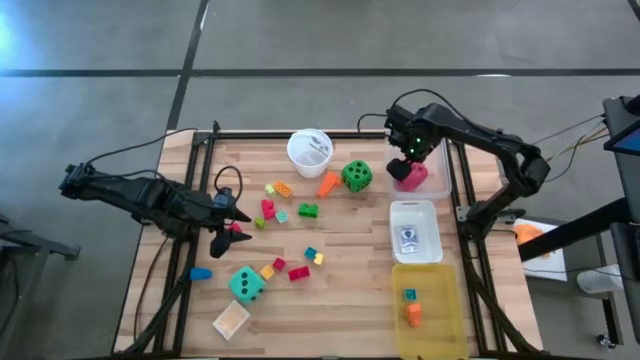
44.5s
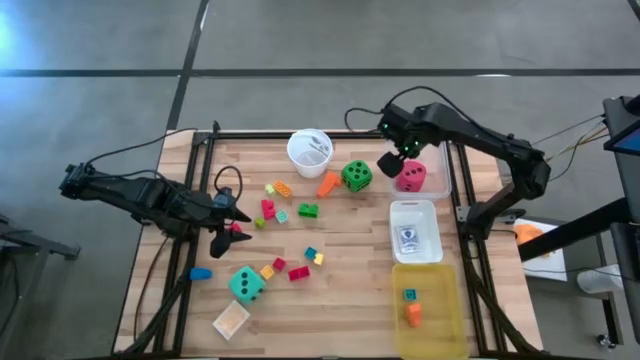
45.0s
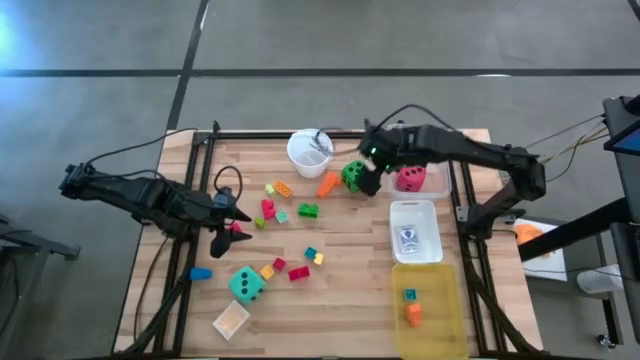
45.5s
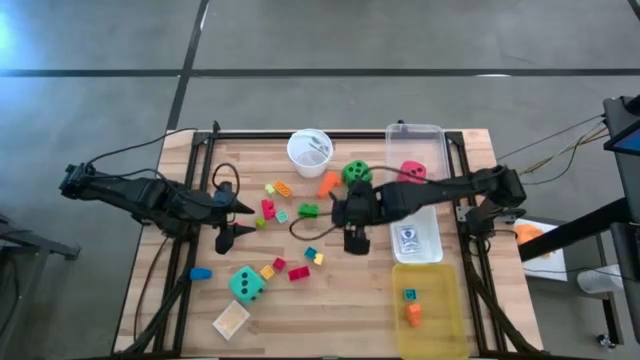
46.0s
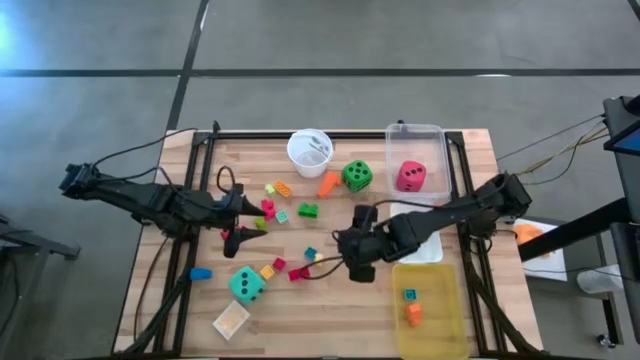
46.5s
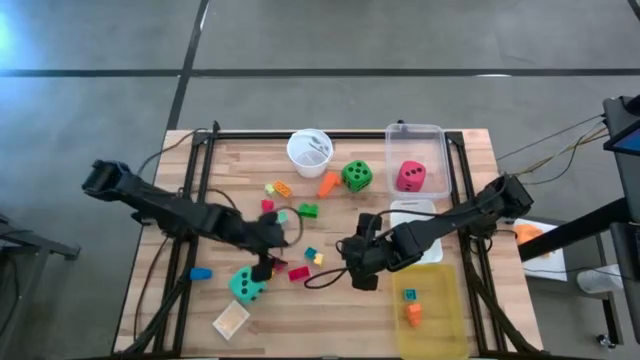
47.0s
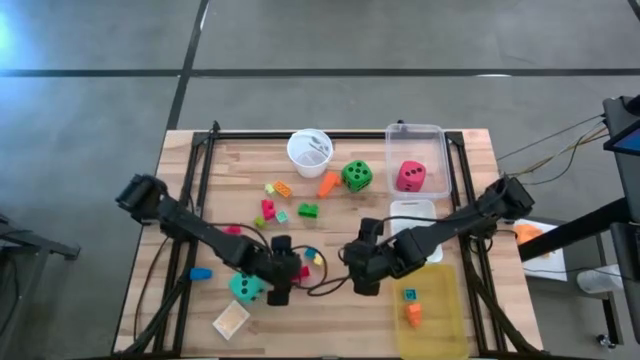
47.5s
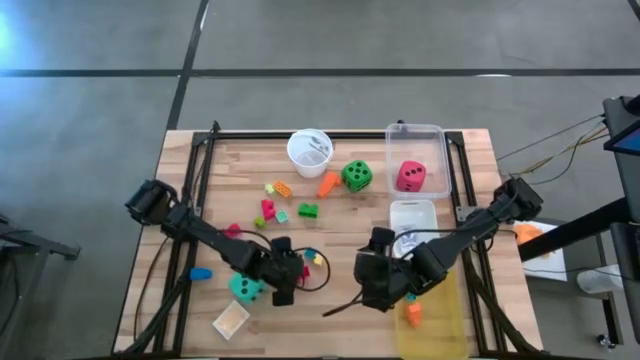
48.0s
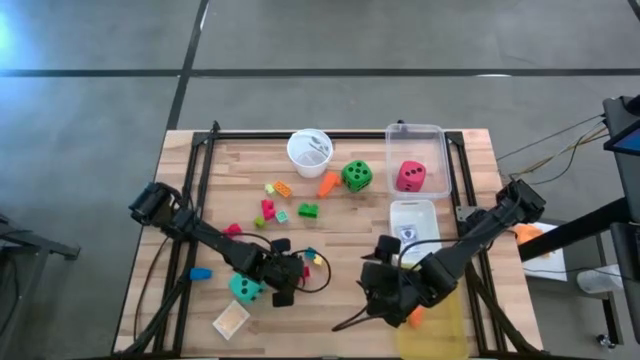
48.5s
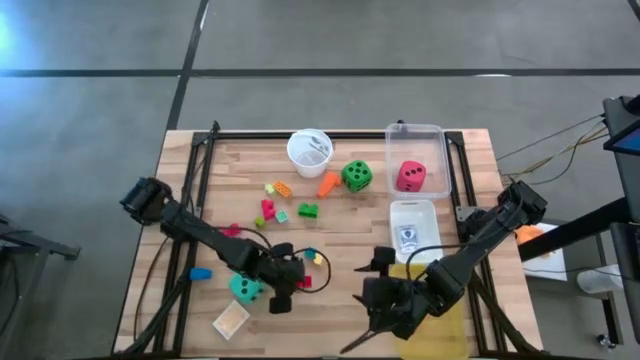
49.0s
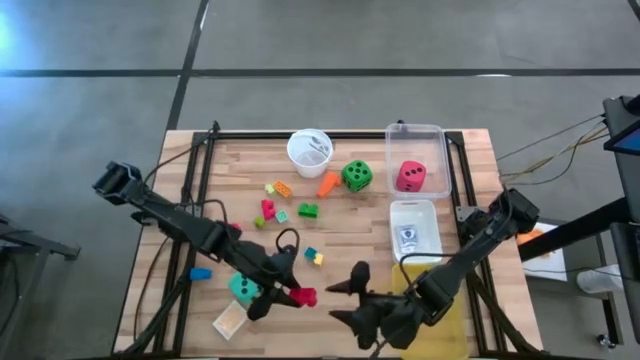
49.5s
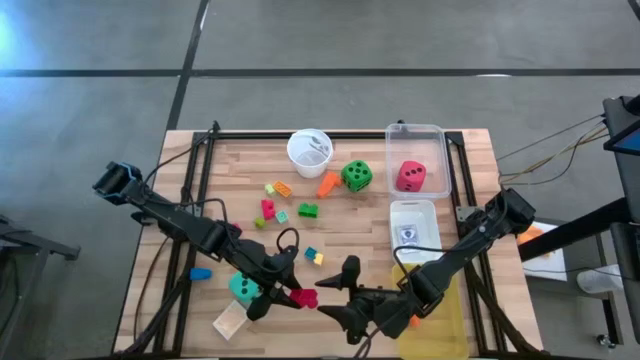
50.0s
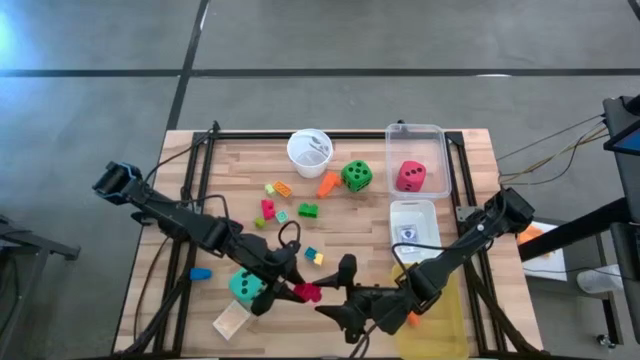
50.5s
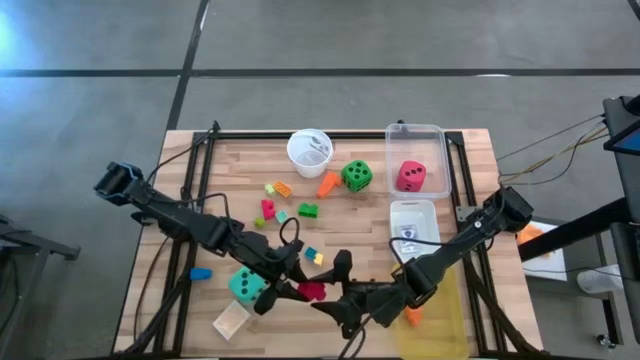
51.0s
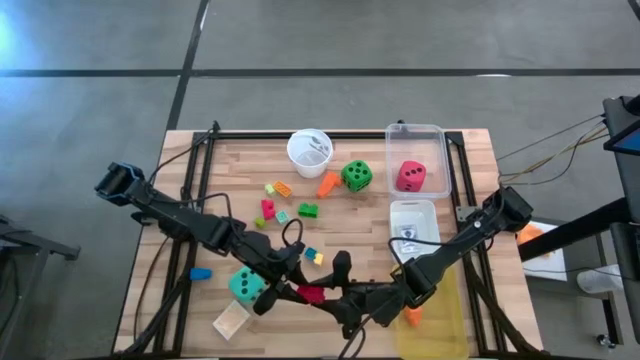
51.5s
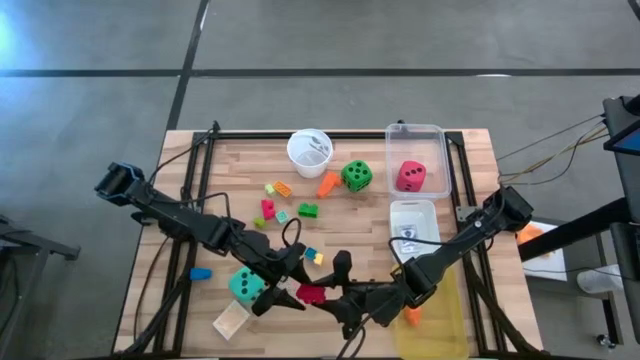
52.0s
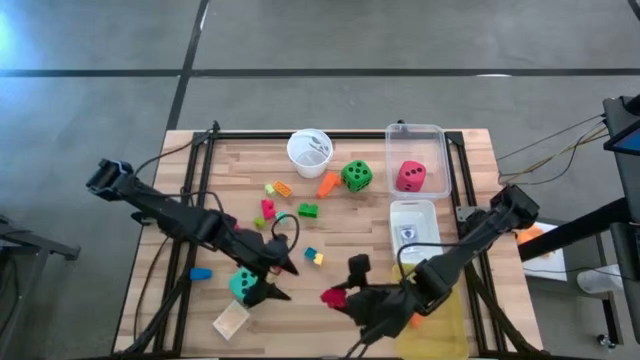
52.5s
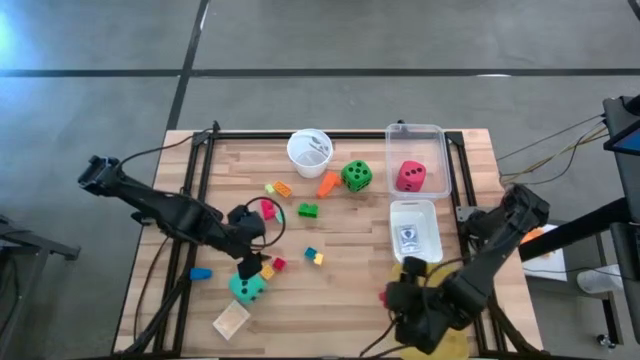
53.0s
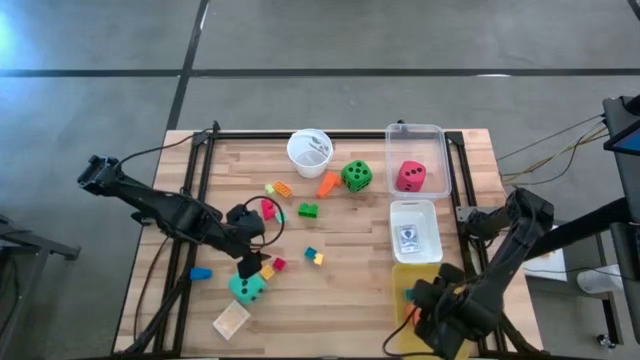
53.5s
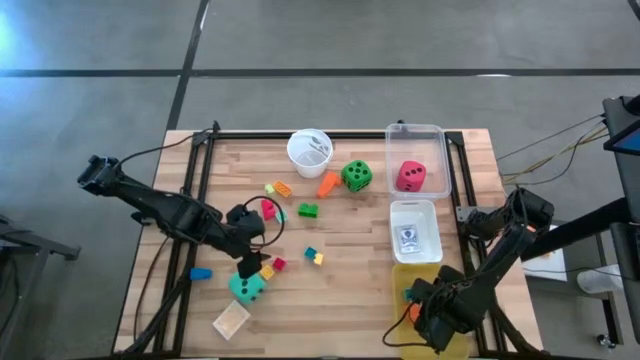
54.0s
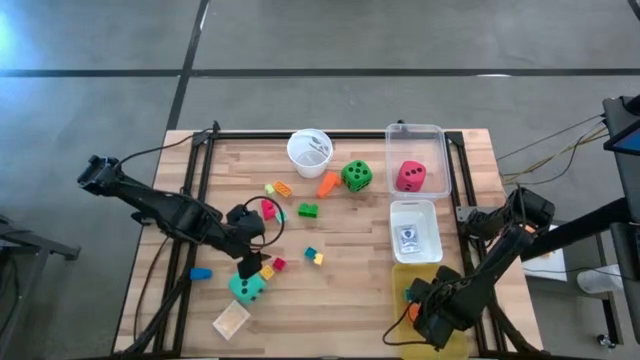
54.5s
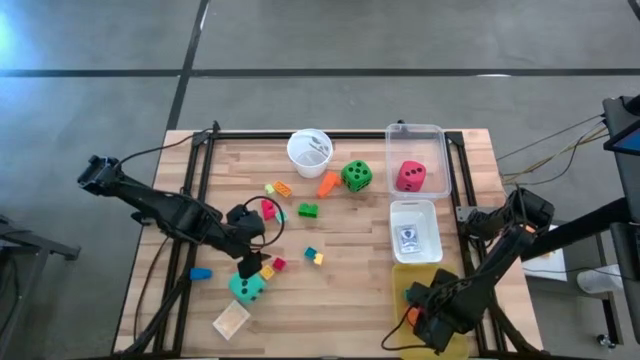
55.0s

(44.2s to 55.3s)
Task: Pick & Place Toys
Put the red game piece into the yellow bin

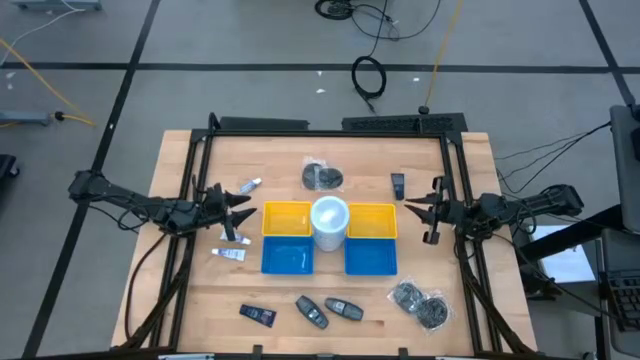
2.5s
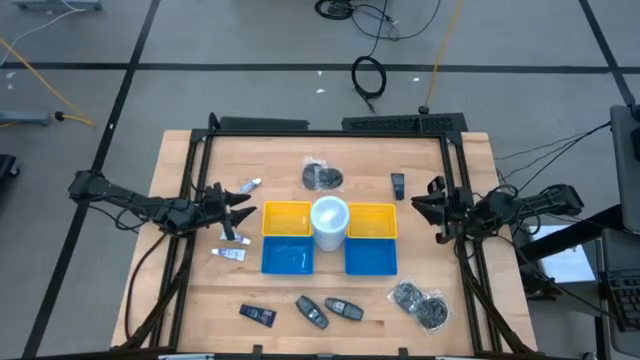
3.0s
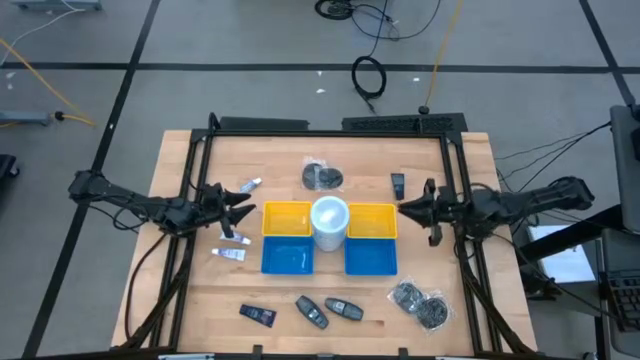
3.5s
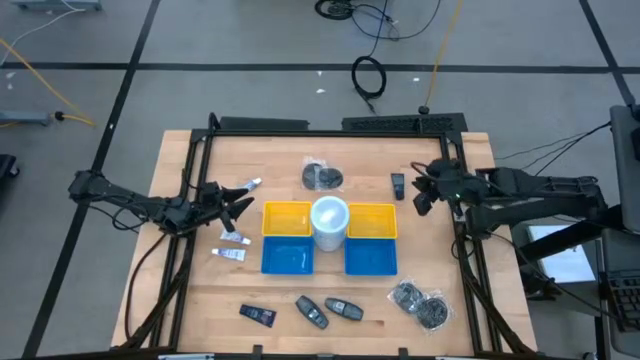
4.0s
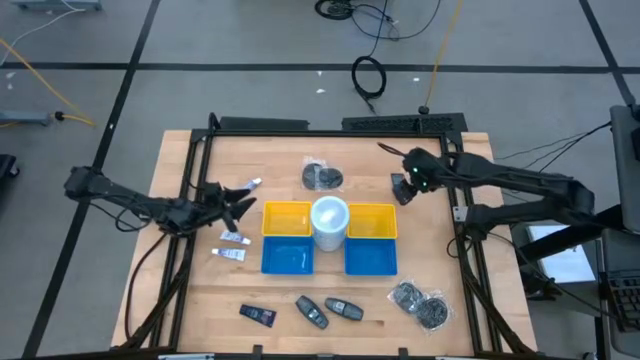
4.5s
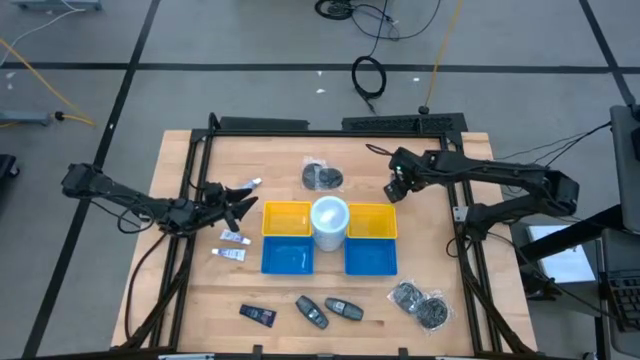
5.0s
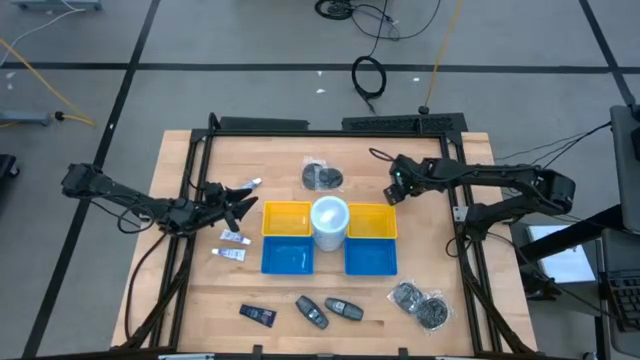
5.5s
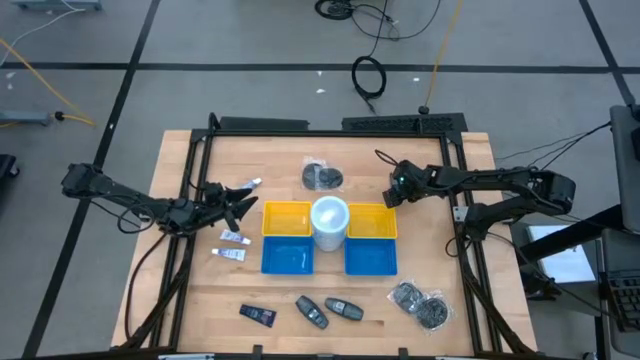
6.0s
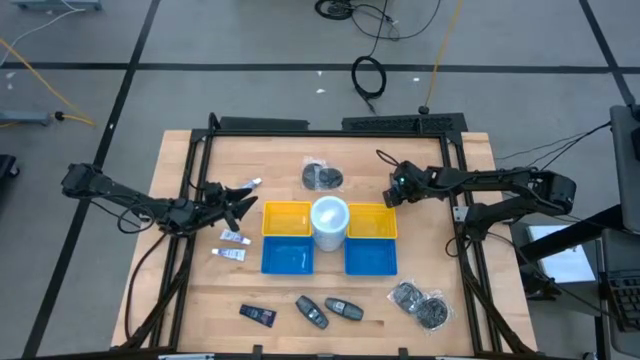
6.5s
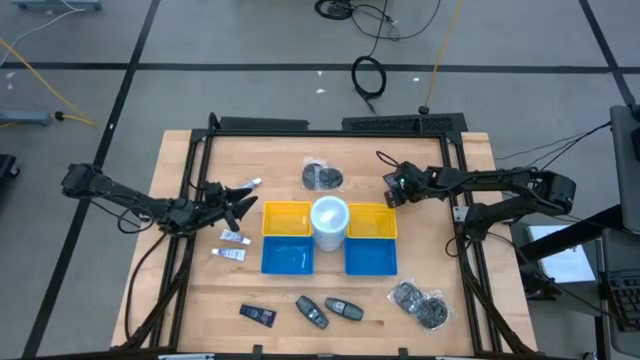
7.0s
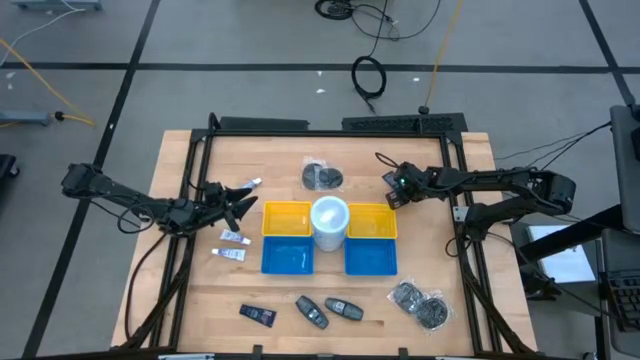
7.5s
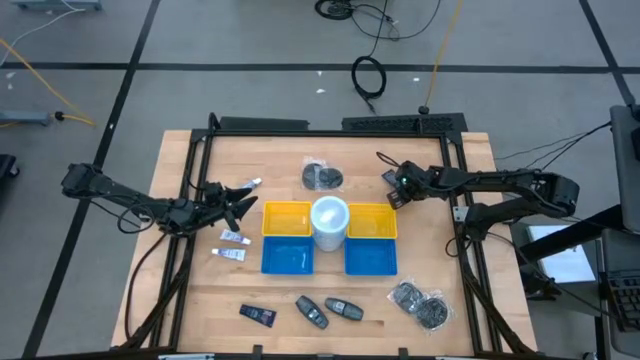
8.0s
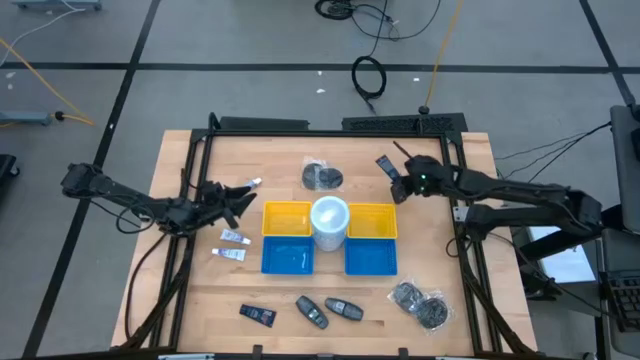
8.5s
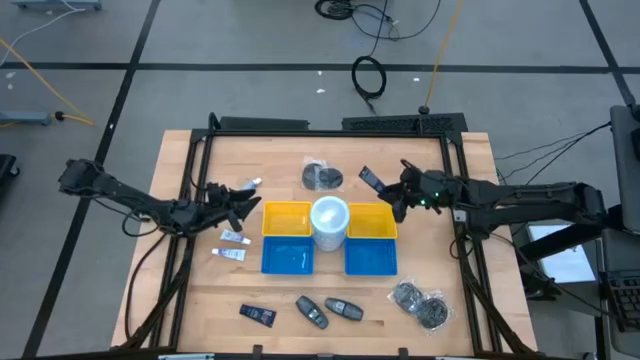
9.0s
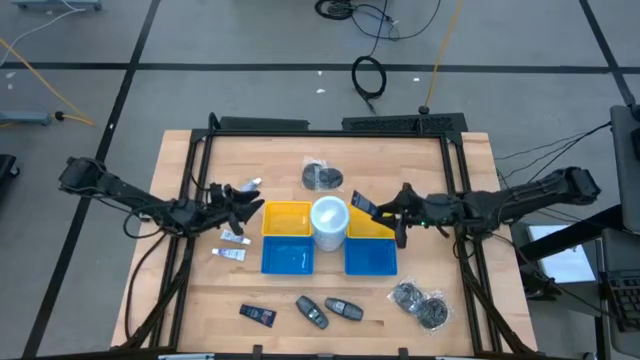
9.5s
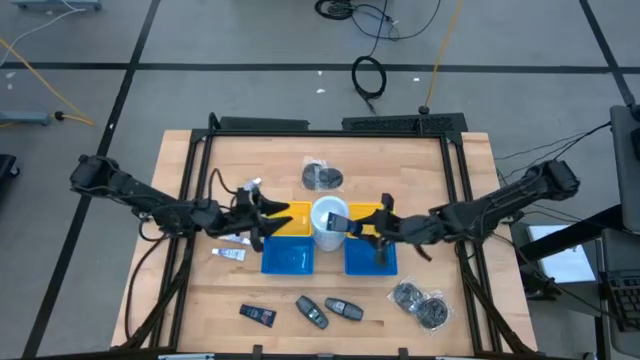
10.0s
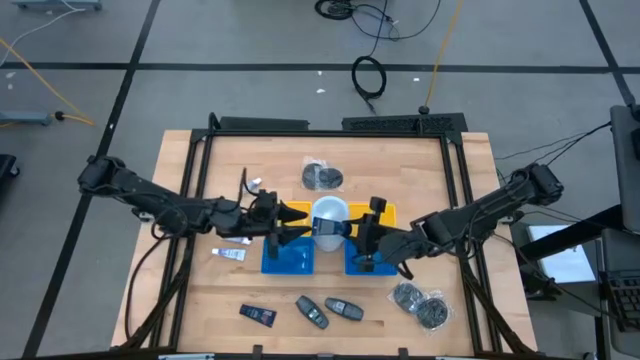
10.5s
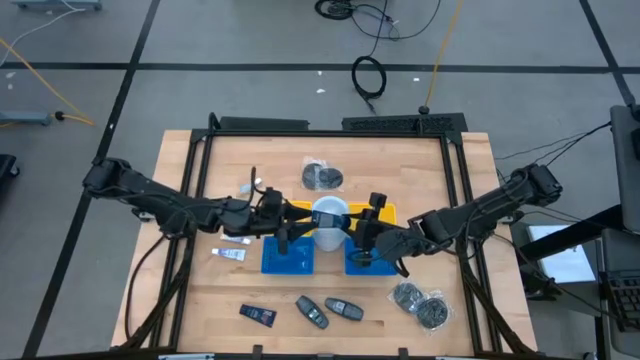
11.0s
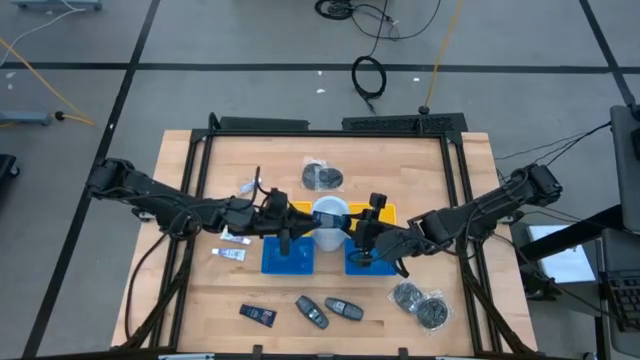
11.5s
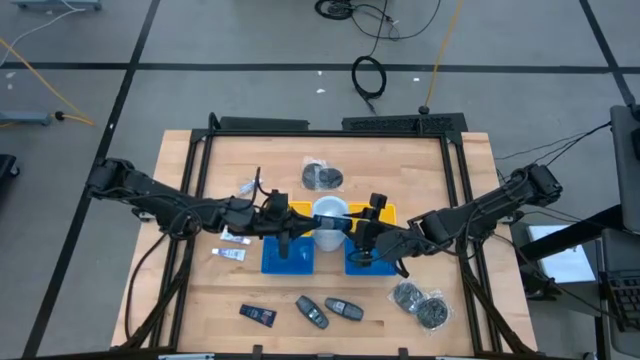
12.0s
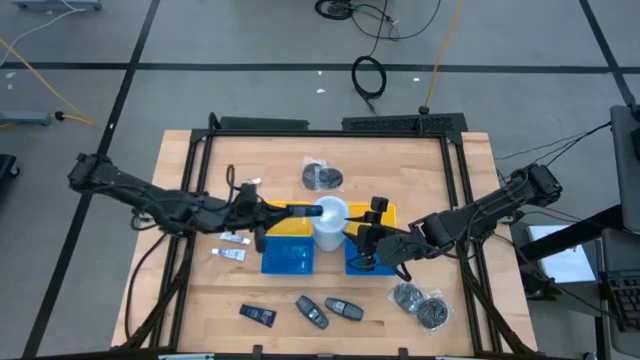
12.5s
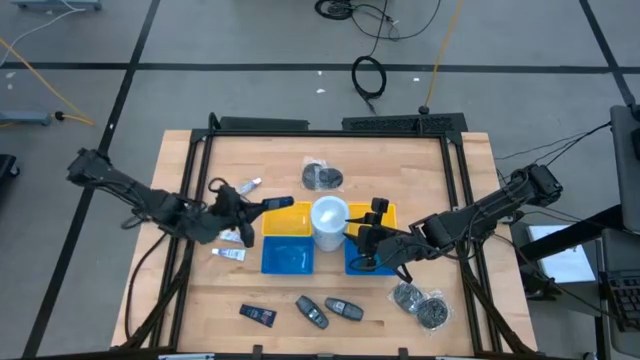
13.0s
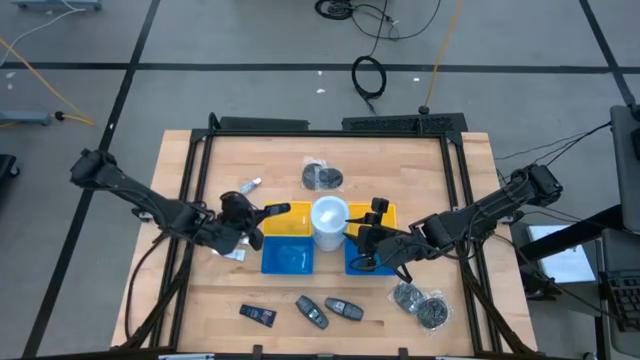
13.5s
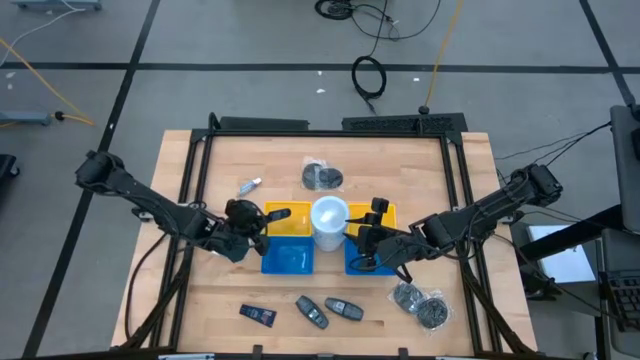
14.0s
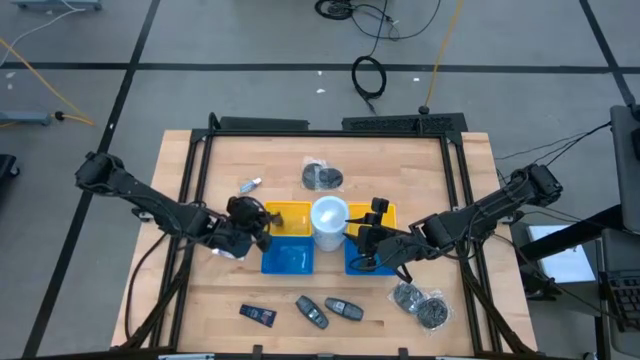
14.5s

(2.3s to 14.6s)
Task: Pick & Place Travel size toiletries
Put the shave cream into the left yellow bin
